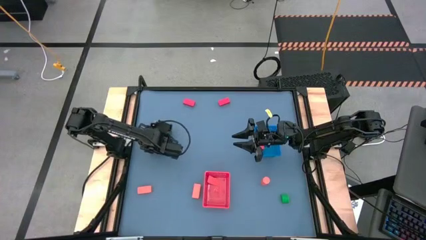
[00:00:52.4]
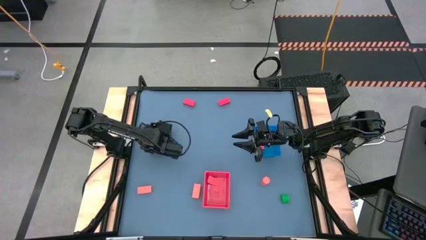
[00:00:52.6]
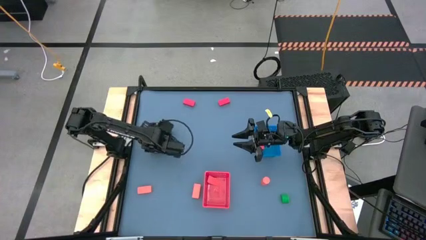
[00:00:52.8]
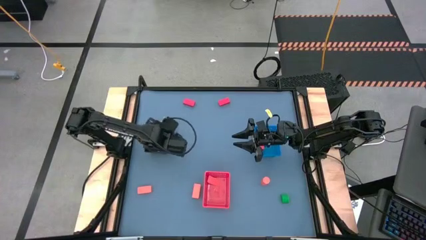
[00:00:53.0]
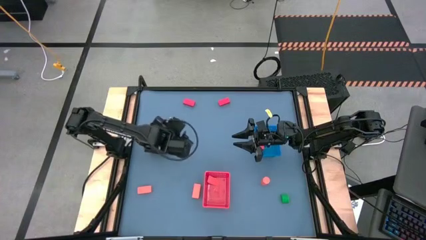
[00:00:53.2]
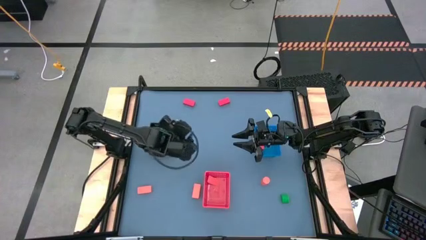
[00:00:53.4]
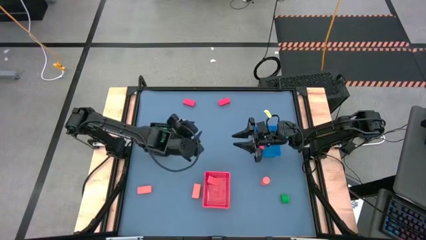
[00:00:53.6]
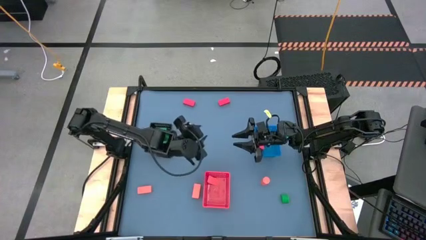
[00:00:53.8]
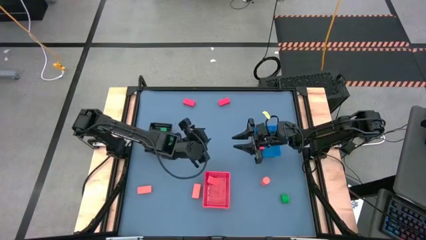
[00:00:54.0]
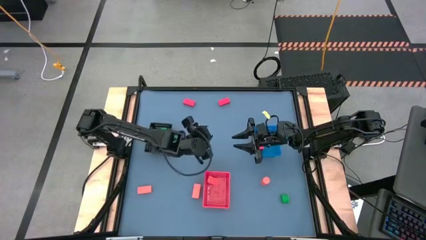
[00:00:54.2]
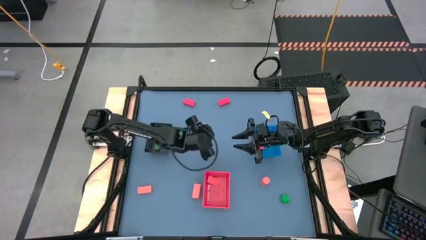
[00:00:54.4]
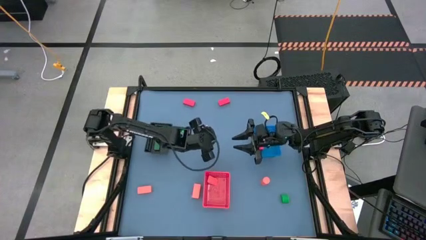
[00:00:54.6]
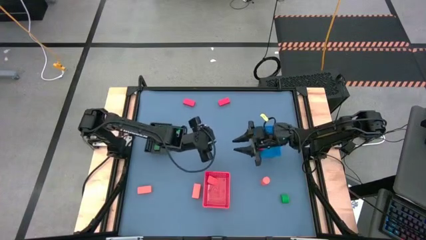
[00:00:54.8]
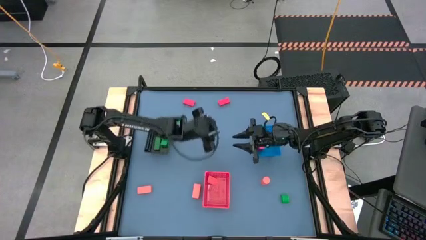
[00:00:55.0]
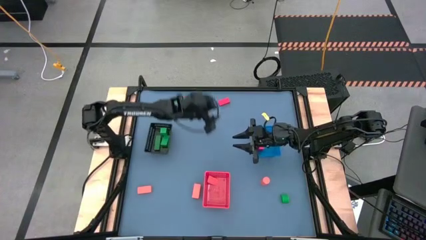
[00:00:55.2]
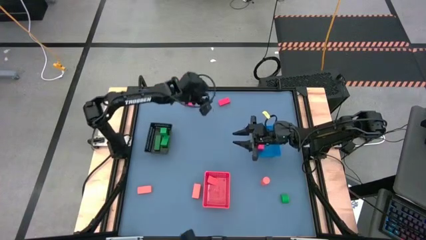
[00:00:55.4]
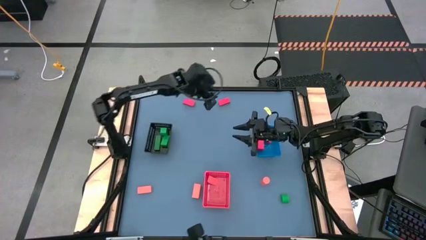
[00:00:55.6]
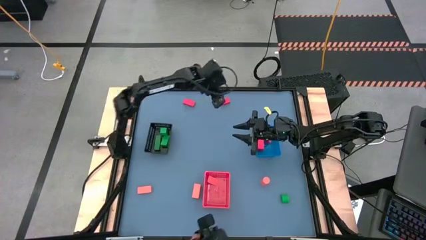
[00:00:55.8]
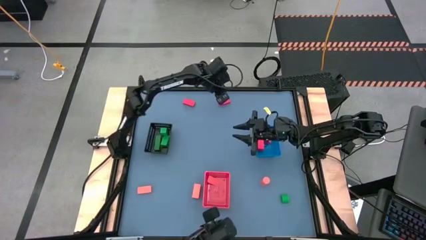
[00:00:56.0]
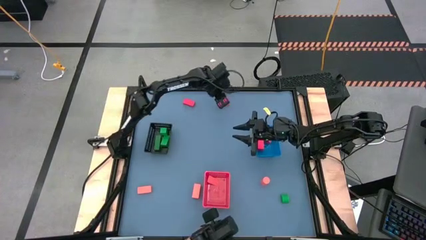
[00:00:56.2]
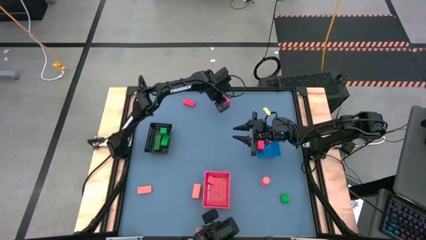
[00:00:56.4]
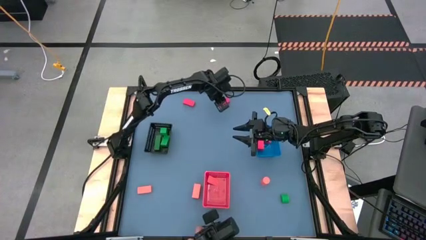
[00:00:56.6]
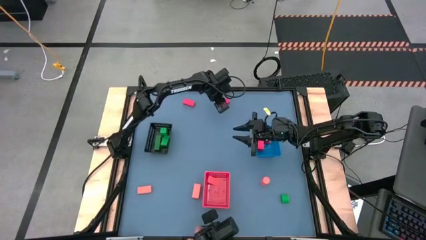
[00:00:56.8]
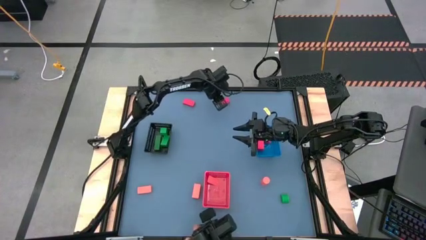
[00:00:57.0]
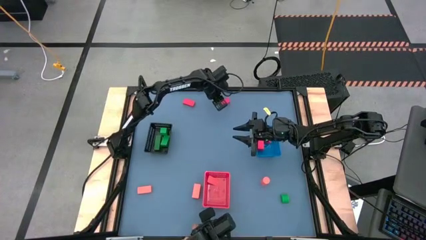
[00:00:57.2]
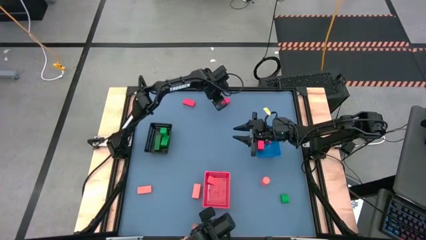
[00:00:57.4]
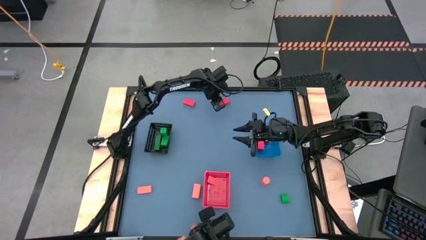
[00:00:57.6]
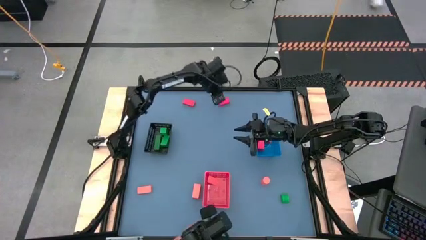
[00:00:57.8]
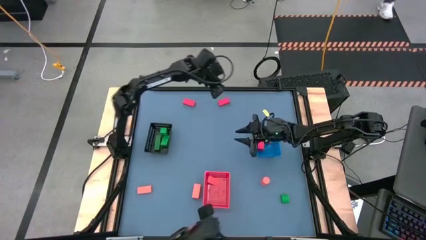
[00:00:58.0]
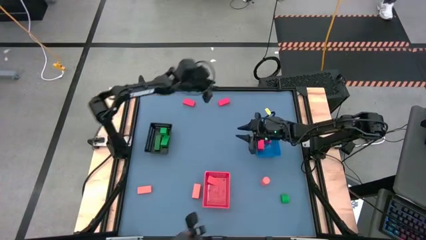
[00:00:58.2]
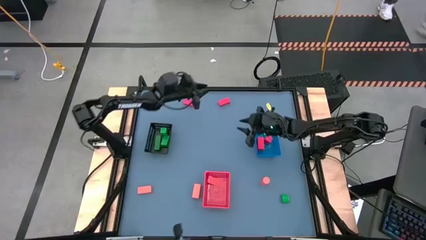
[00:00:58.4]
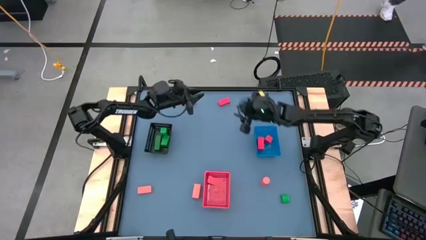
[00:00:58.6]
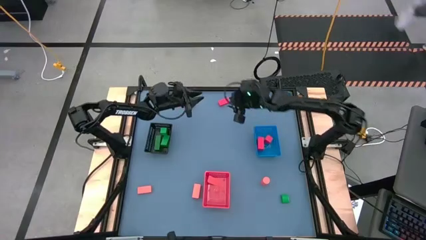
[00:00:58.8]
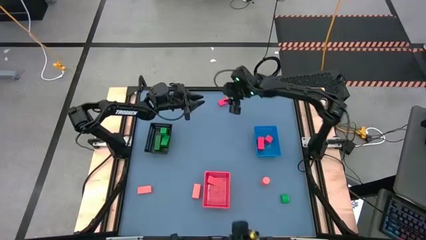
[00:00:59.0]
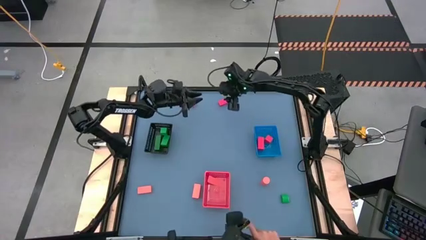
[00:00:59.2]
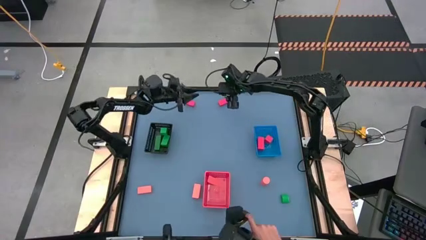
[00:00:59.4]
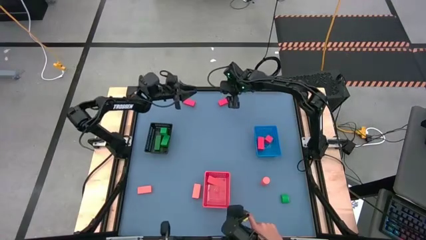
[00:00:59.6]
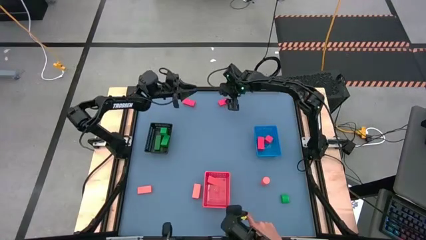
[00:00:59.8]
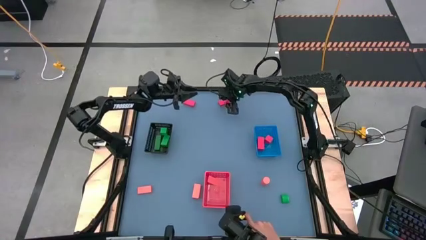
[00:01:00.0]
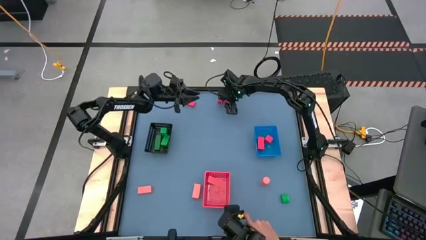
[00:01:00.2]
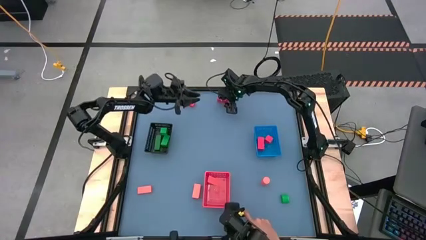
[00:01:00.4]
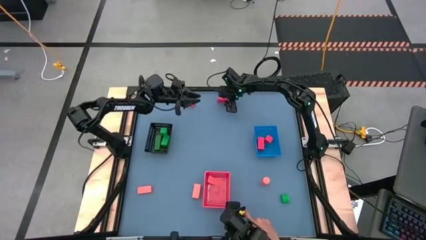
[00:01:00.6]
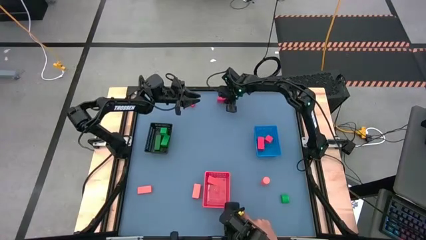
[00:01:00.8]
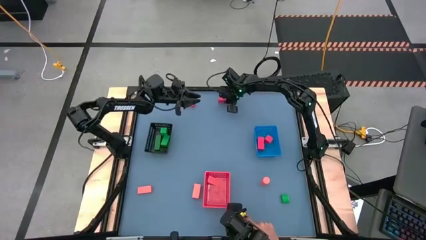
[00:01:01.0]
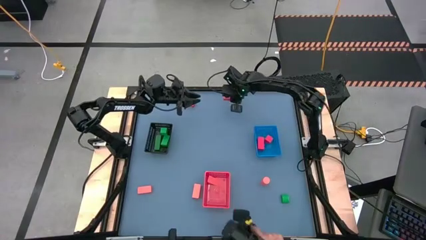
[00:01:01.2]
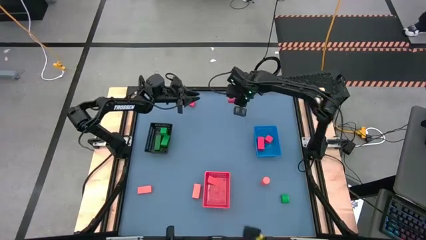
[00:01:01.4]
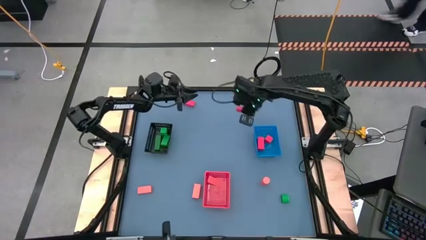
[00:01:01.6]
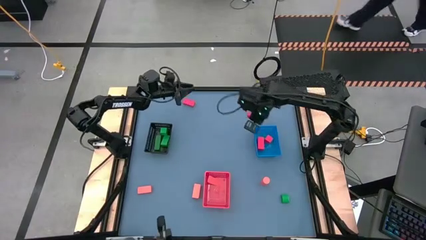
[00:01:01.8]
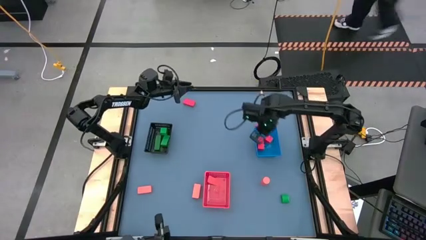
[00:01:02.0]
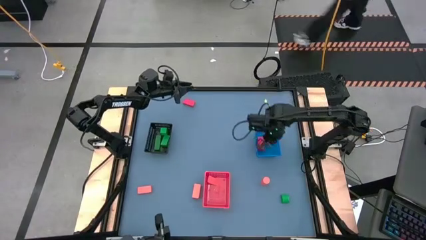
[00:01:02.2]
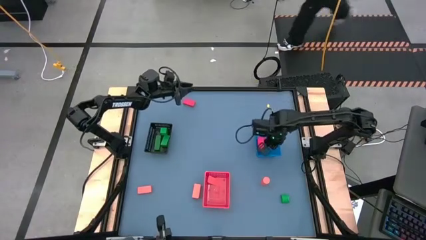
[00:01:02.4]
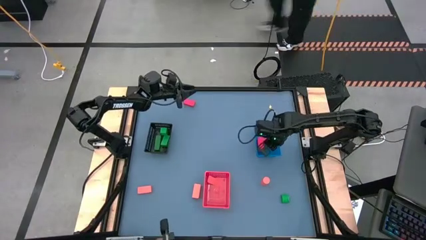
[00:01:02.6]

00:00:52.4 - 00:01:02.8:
Task: Sort & place blocks by color
Put the red block into the blue bin

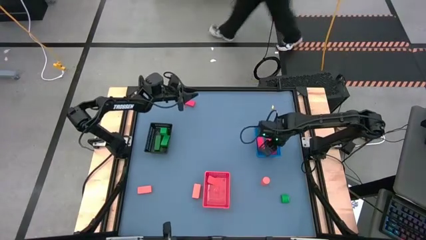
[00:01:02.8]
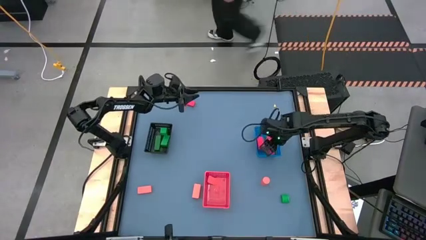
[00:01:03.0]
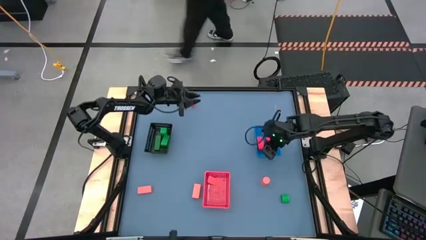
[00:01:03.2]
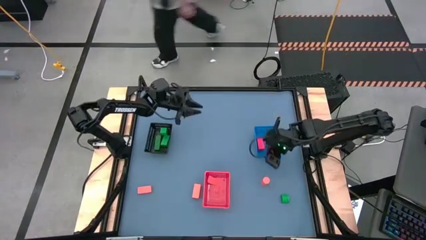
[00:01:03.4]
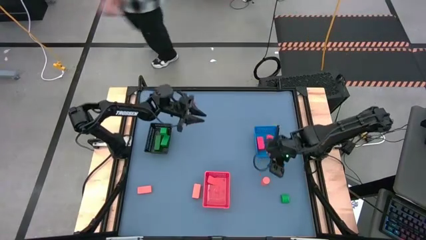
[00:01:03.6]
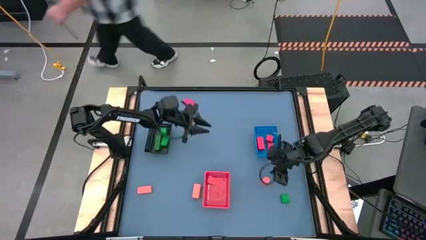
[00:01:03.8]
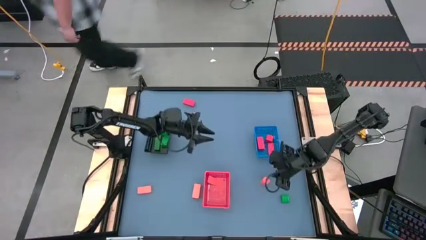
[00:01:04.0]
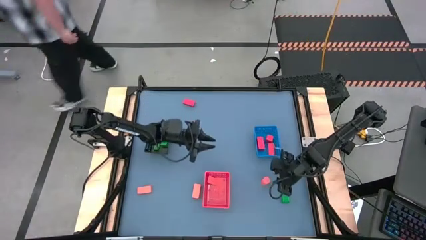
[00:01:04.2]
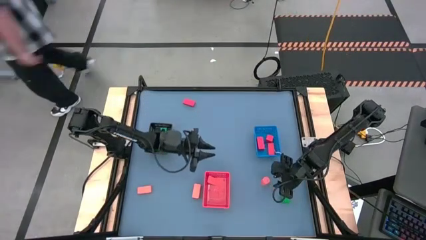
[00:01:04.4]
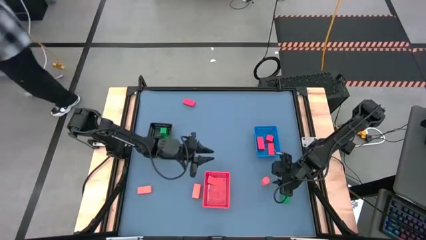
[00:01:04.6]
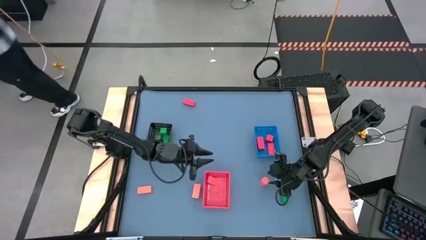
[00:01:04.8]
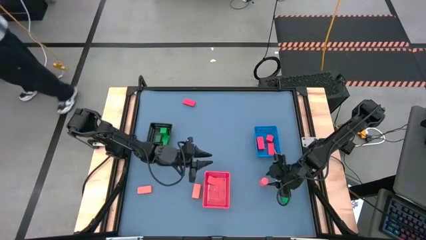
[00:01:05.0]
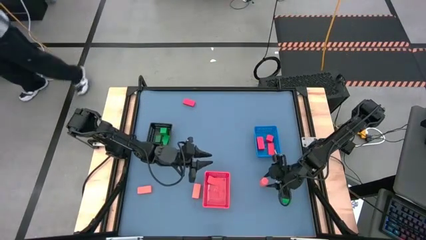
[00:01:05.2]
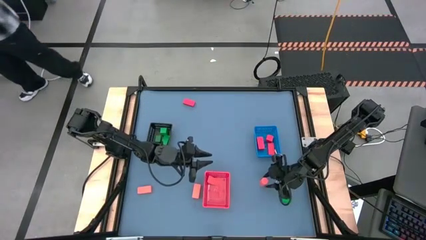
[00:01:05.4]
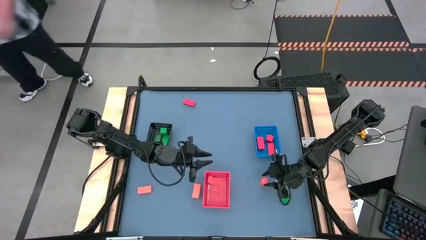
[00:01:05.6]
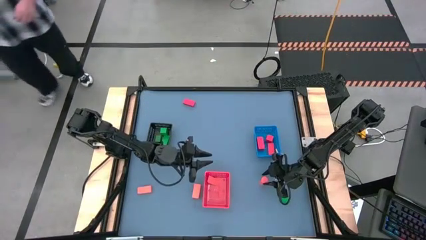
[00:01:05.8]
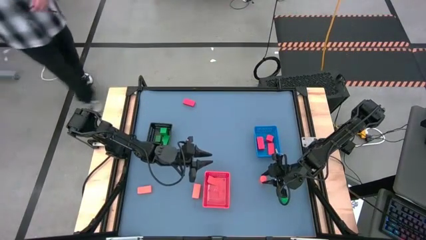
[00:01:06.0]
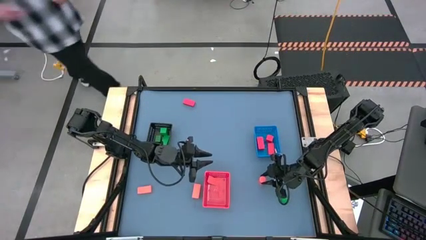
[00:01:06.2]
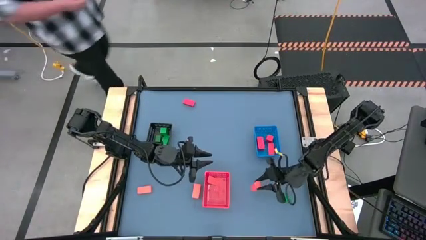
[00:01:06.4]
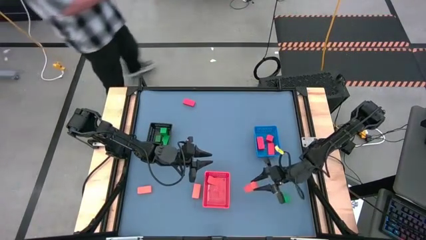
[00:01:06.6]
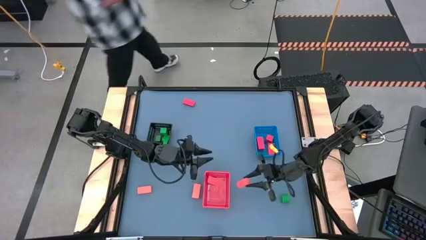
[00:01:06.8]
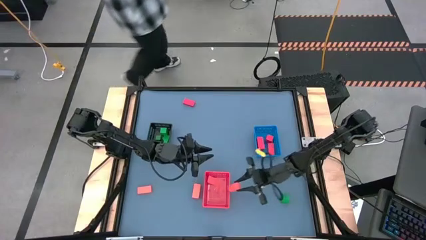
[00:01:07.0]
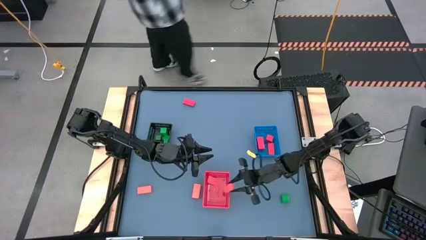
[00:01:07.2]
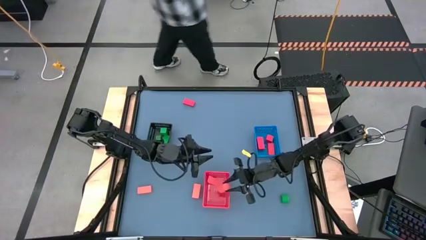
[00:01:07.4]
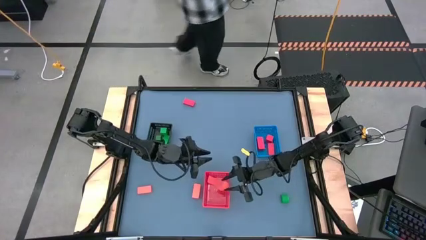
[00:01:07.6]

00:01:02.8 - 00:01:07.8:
Put the orange block into the orange bin
